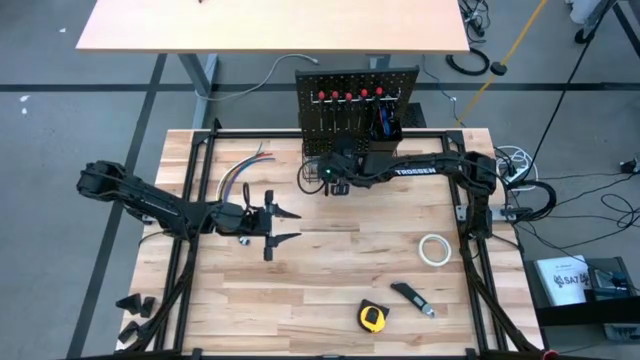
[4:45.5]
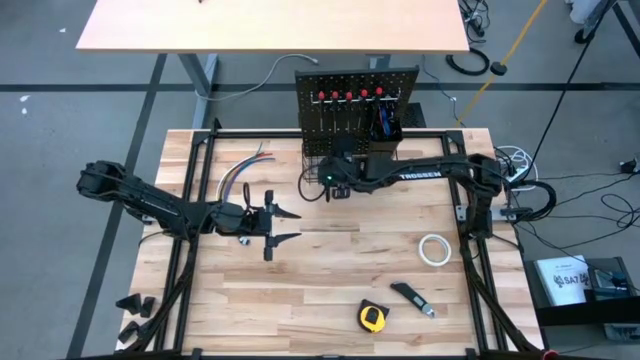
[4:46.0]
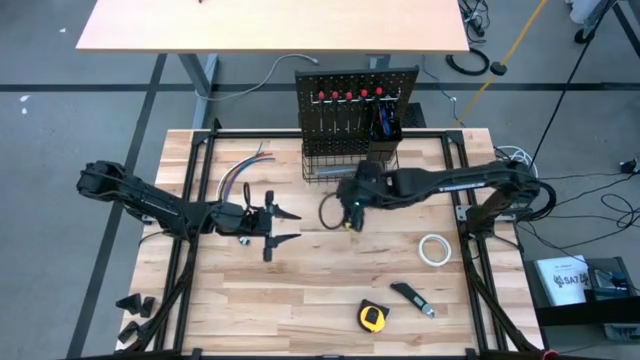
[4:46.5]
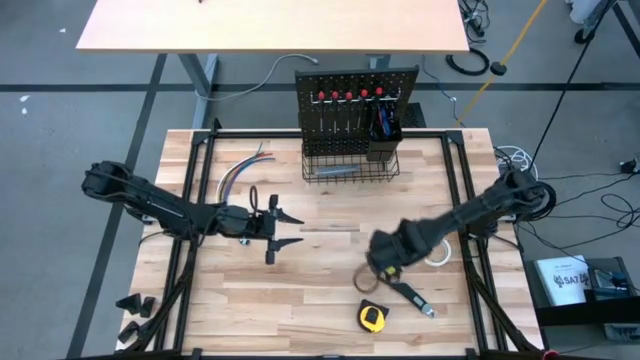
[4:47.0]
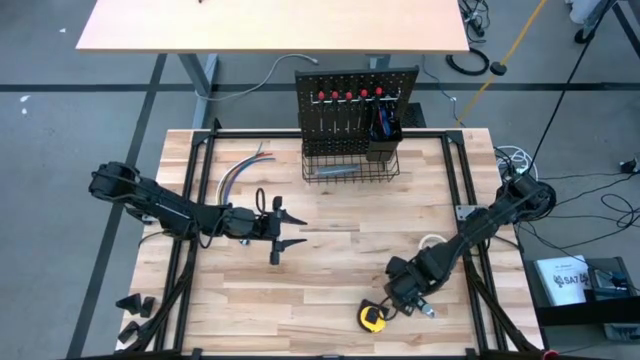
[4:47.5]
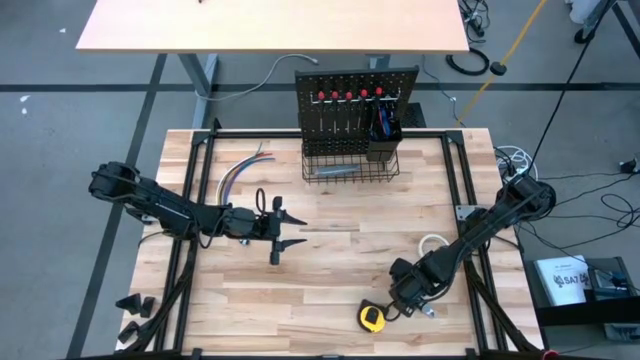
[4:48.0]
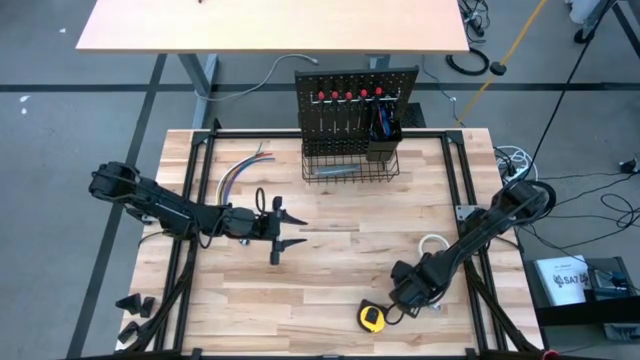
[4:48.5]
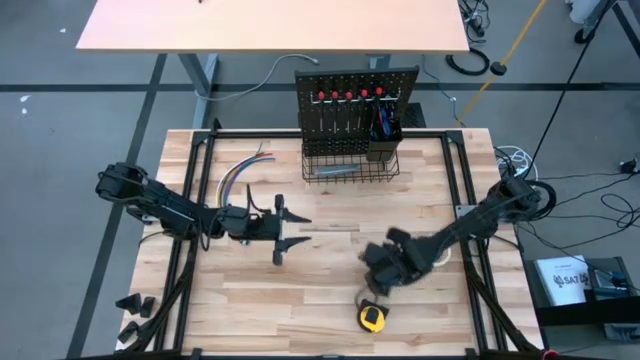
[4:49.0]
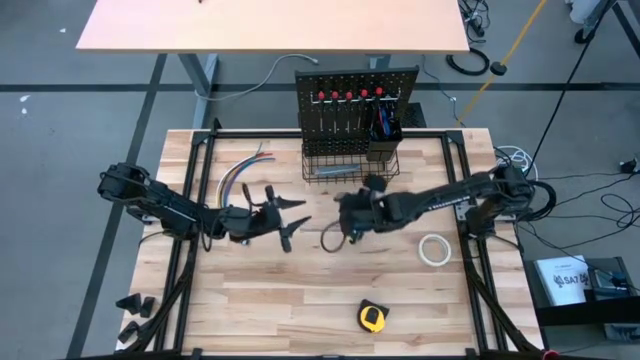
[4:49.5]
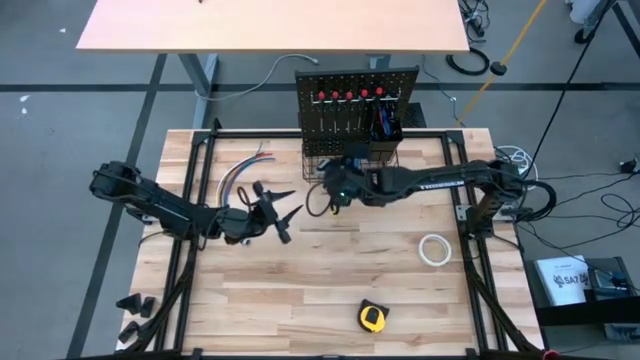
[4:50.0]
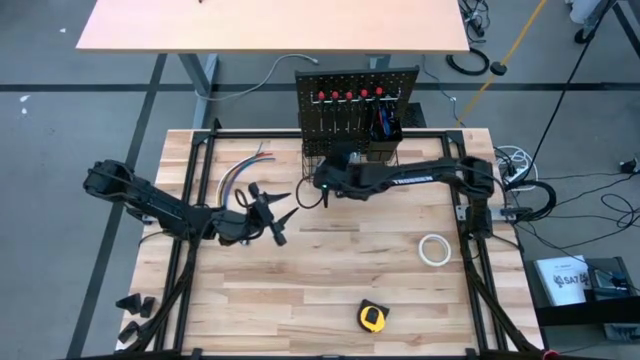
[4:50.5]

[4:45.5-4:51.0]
Task: Hang tools onto peg board
Put the black cutter knife into the wire basket bin on the pegboard

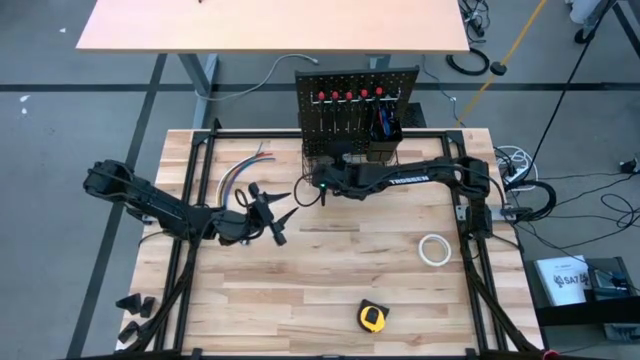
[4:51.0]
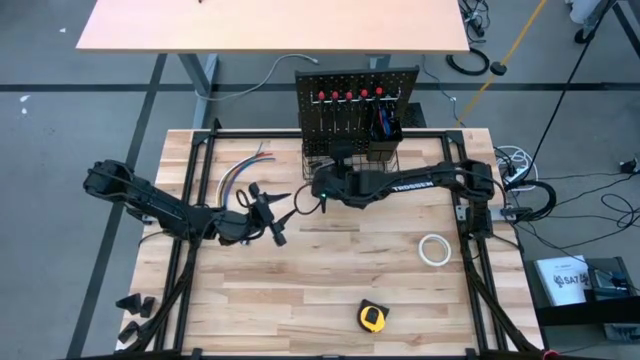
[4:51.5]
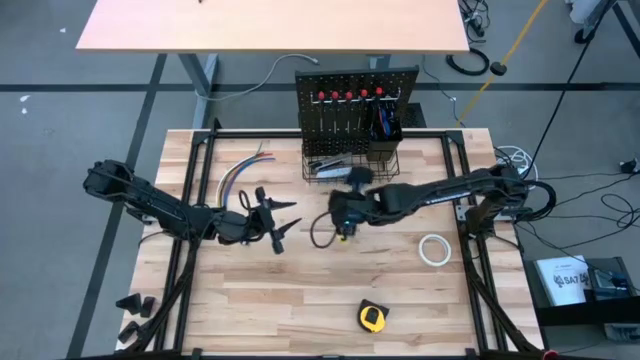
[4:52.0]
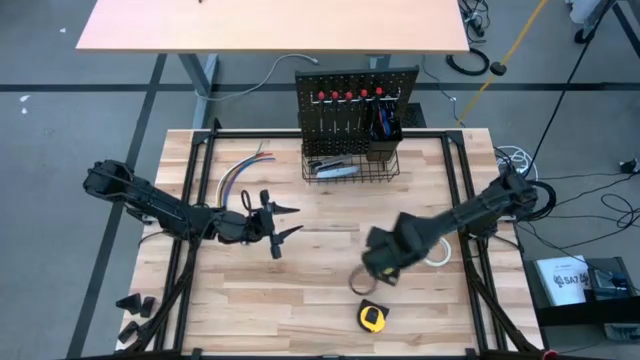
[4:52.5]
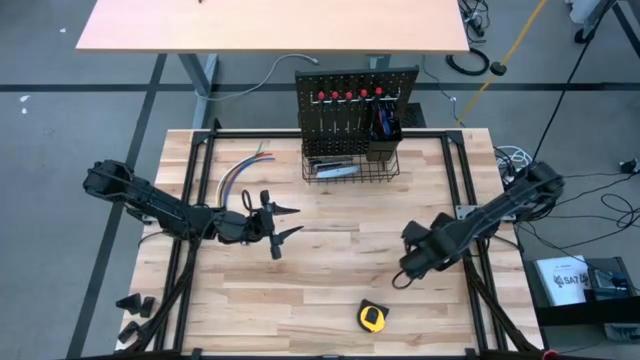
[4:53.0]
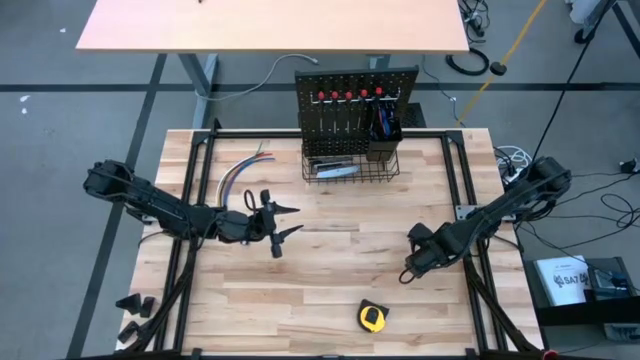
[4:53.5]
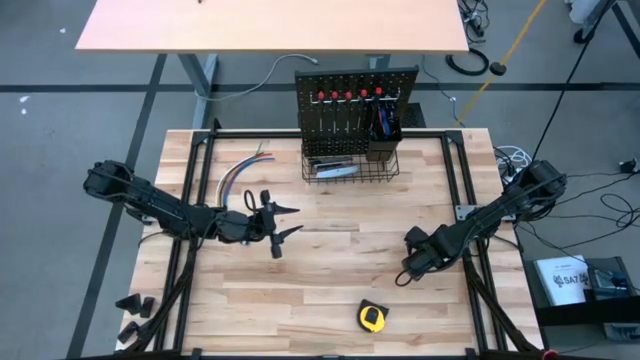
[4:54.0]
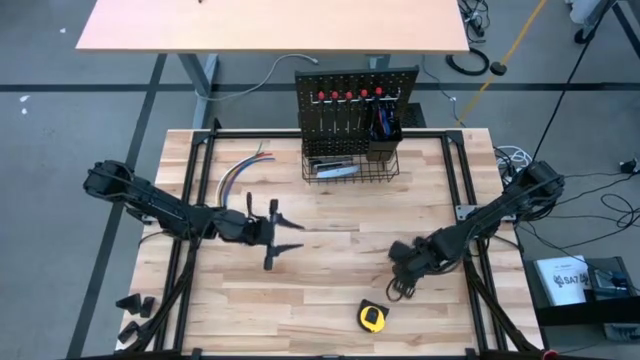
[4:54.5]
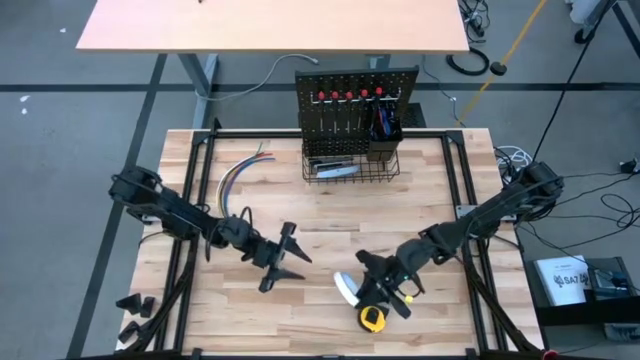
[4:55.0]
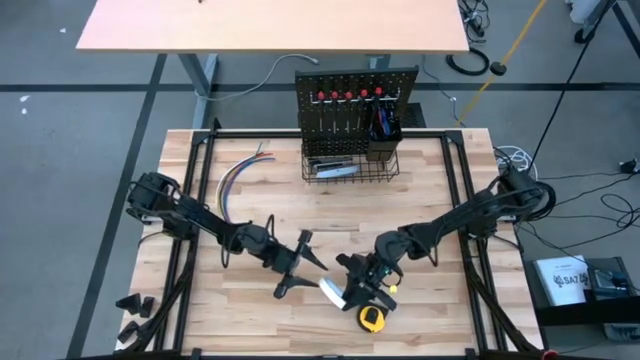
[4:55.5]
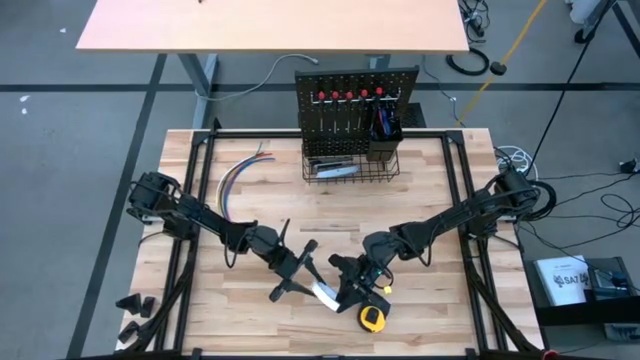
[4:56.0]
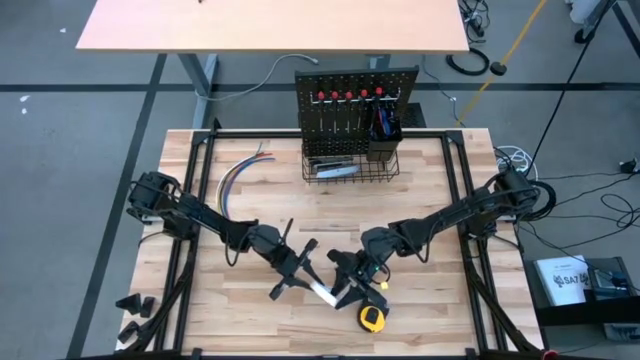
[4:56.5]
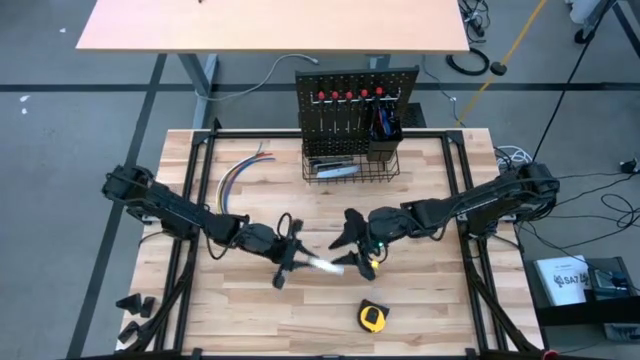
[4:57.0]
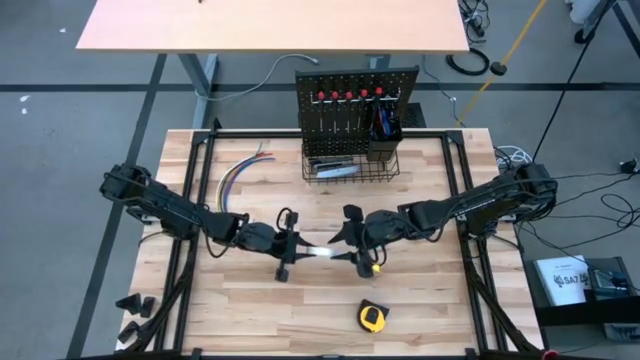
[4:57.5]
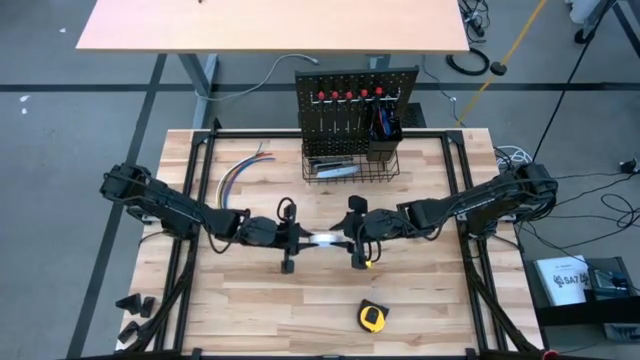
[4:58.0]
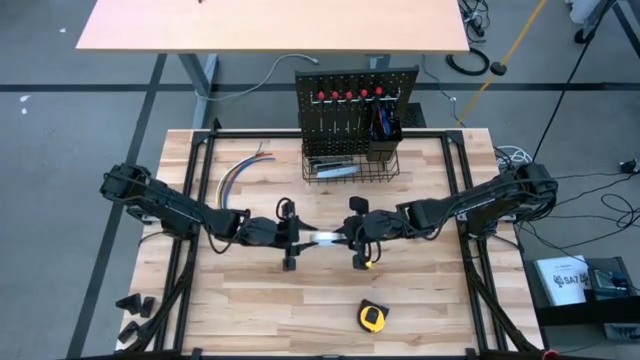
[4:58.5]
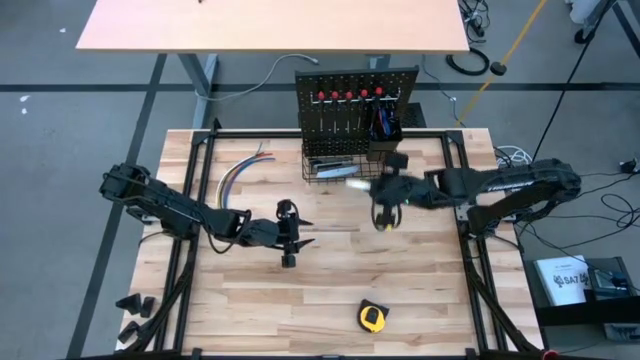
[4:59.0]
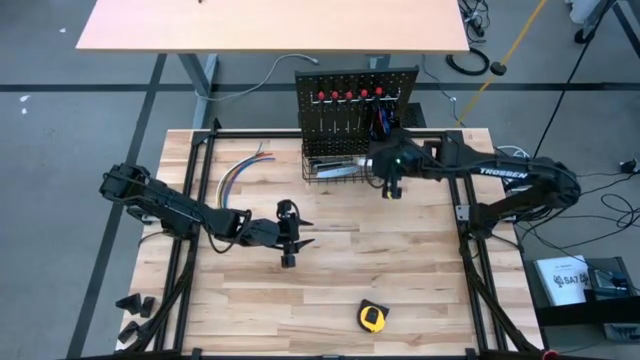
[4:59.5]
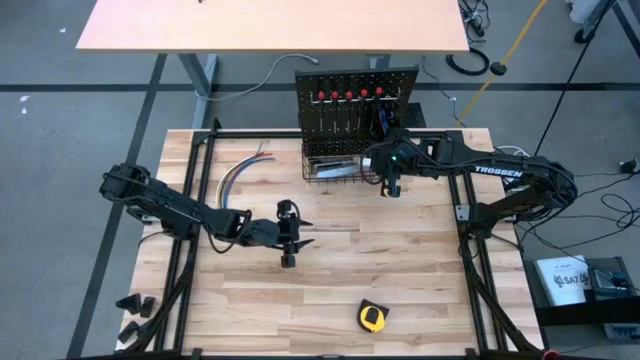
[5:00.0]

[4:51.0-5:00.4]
Put the masking tape into the wire basket bin on the pegboard

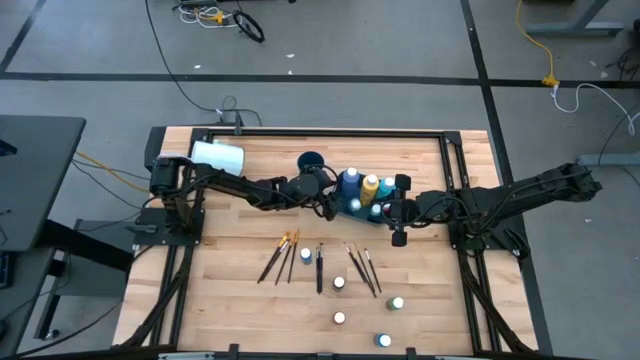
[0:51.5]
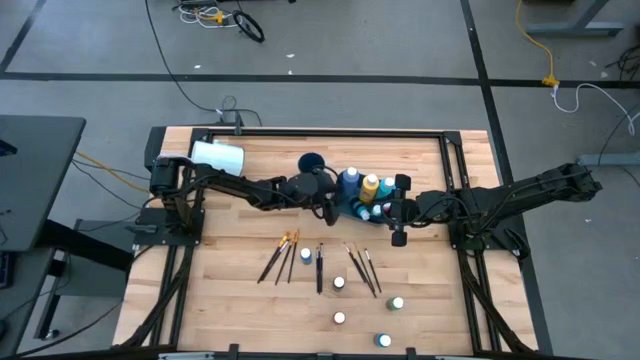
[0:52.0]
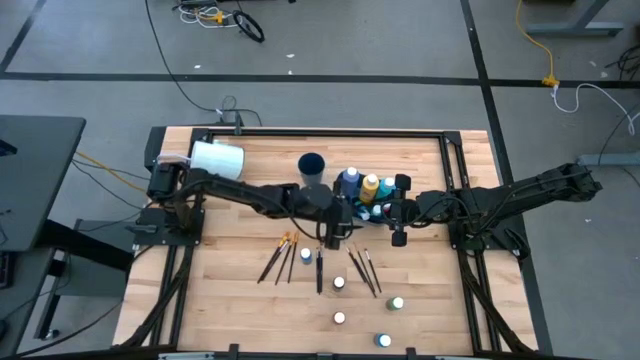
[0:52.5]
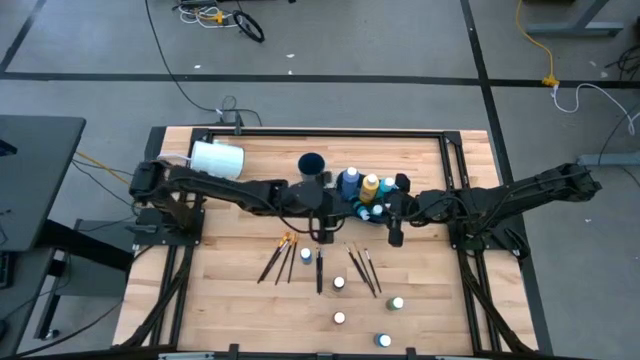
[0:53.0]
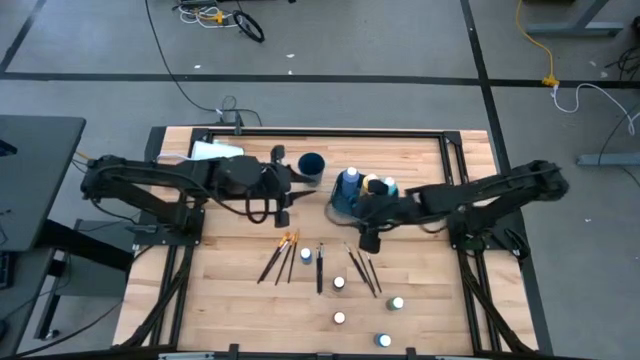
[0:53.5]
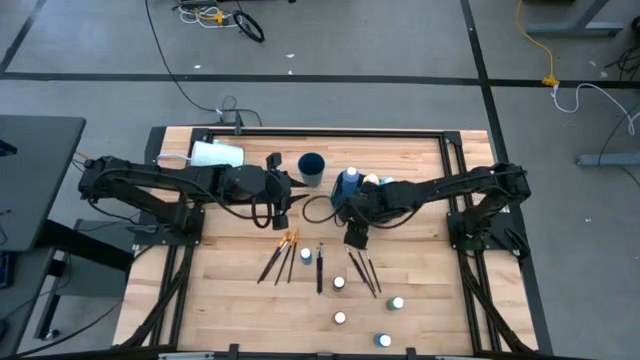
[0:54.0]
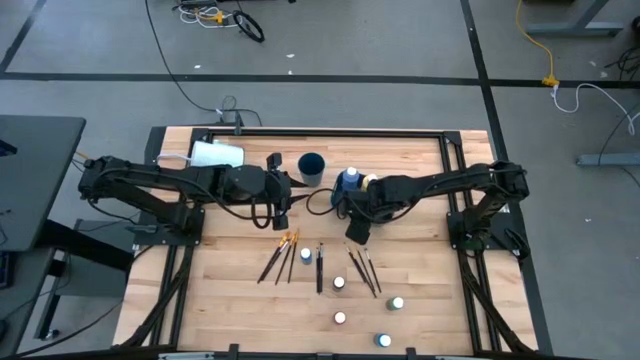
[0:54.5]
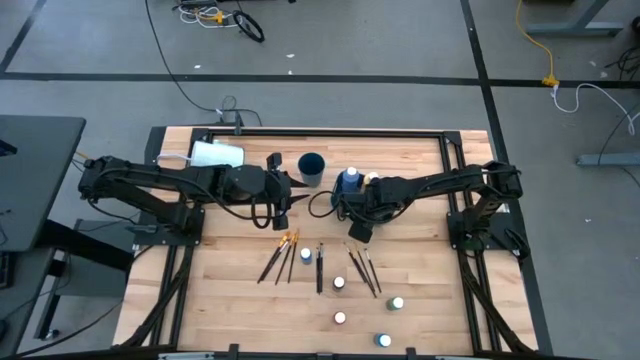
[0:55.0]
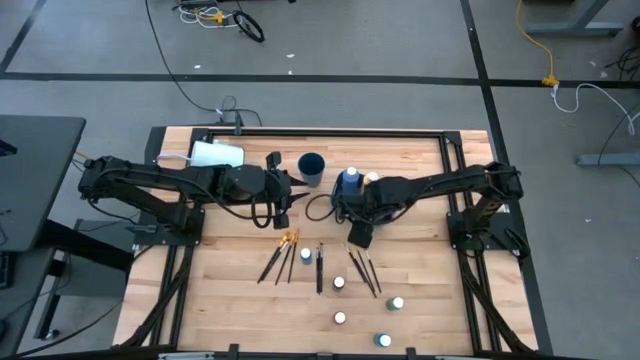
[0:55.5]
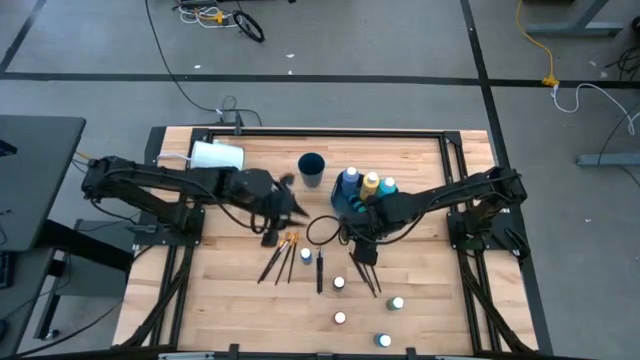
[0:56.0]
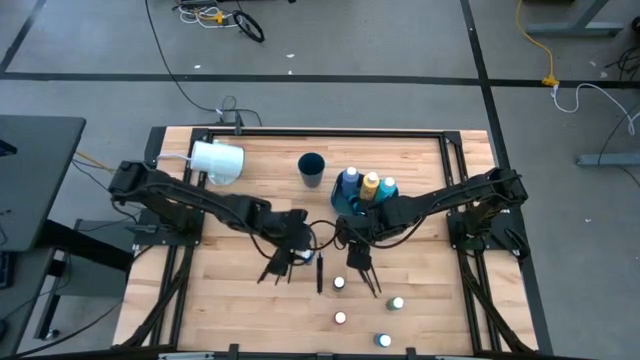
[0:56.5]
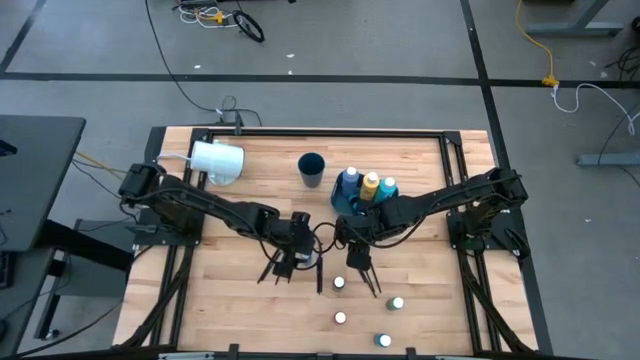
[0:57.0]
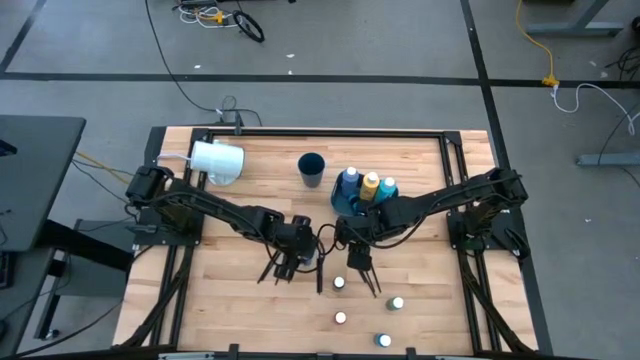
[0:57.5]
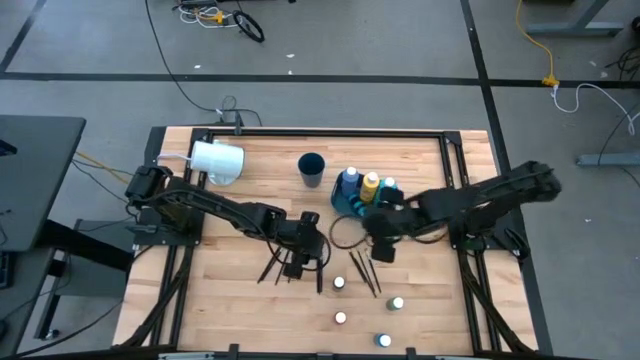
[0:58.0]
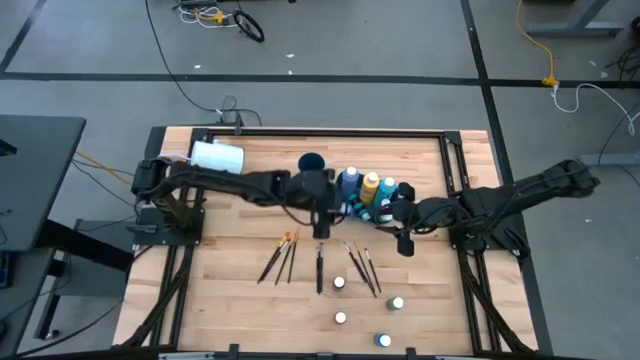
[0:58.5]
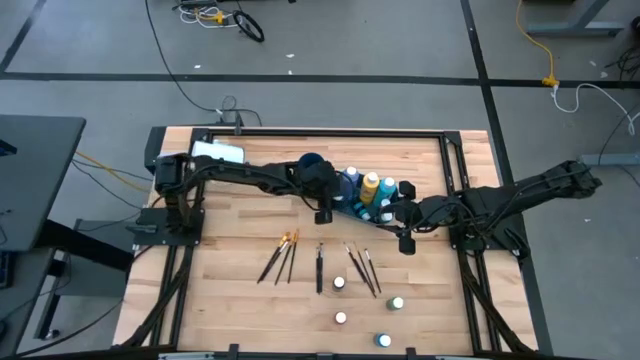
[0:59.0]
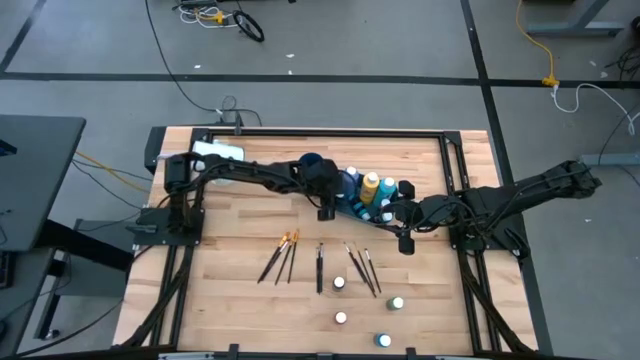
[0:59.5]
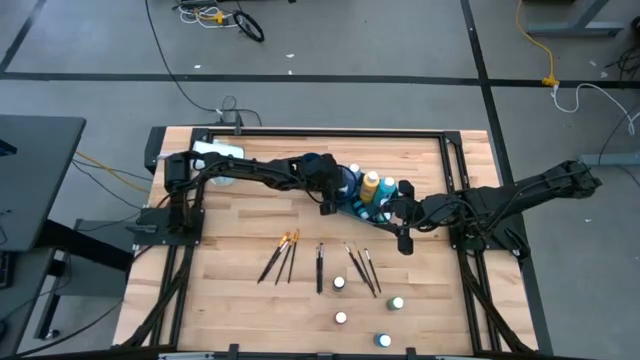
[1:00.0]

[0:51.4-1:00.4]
Task: Pick & Place Paint Supplies
Put the small blue paint bottle into the blue bin
